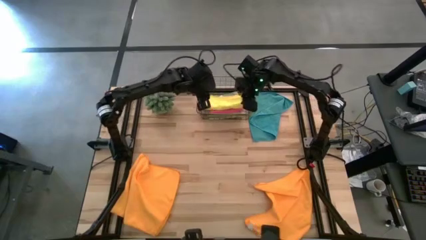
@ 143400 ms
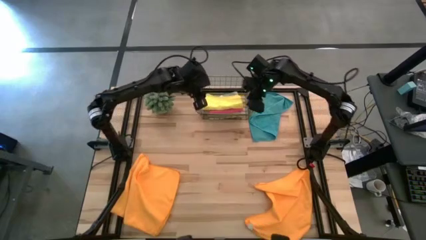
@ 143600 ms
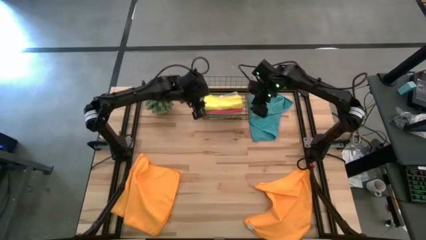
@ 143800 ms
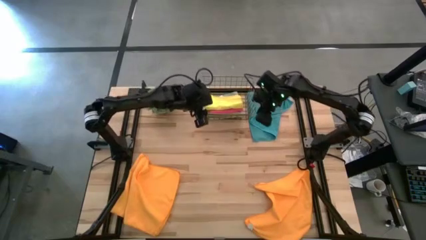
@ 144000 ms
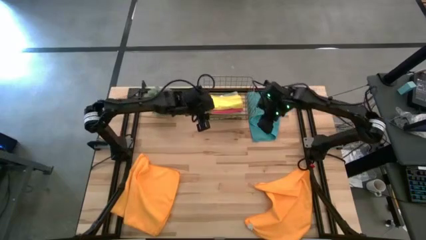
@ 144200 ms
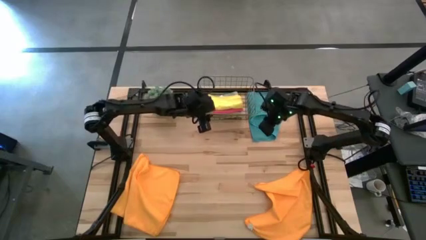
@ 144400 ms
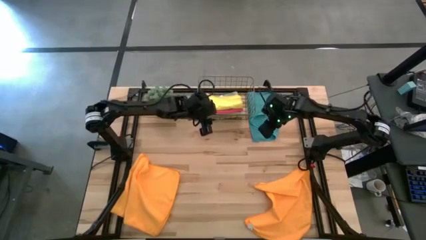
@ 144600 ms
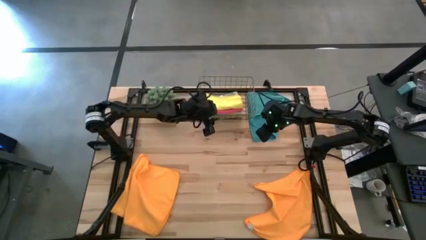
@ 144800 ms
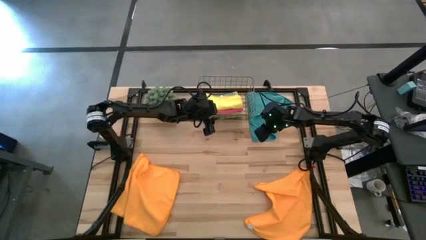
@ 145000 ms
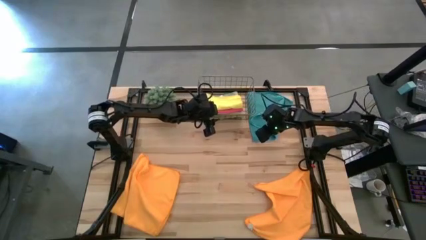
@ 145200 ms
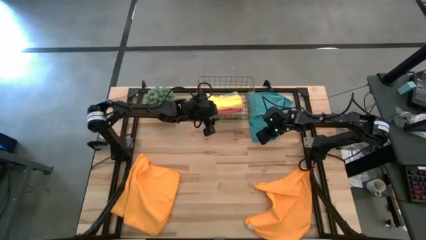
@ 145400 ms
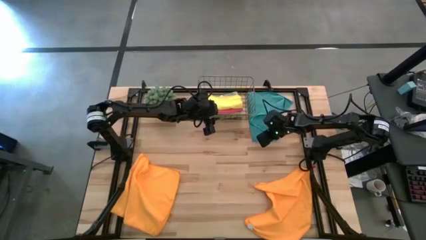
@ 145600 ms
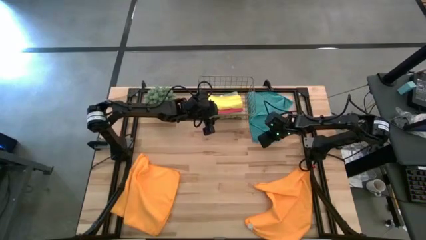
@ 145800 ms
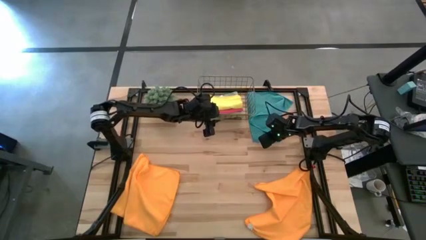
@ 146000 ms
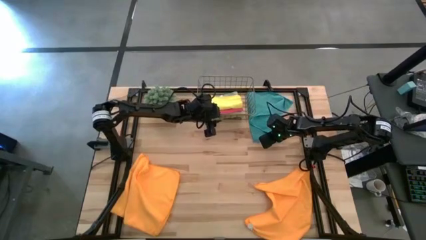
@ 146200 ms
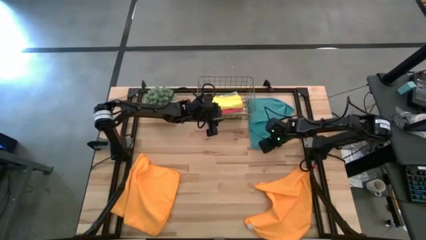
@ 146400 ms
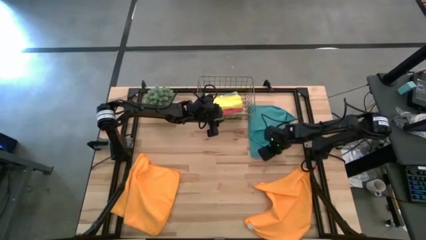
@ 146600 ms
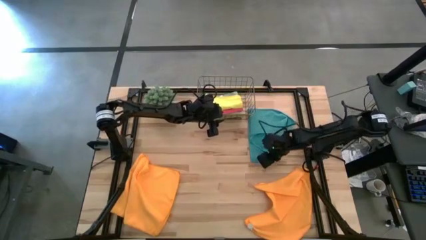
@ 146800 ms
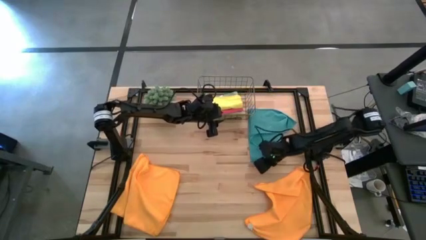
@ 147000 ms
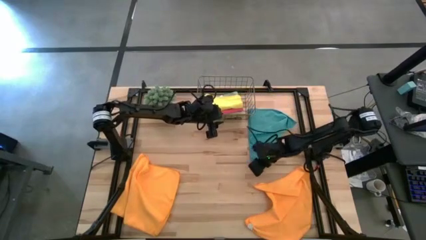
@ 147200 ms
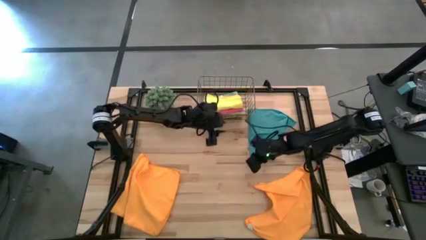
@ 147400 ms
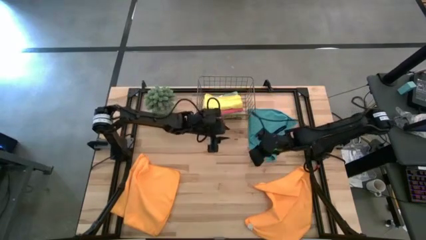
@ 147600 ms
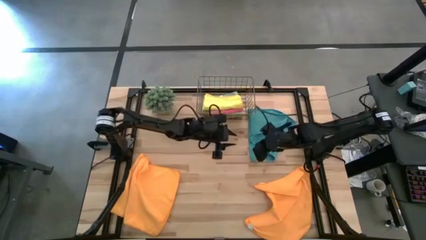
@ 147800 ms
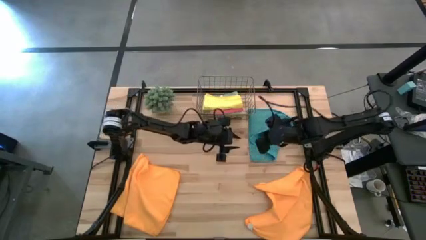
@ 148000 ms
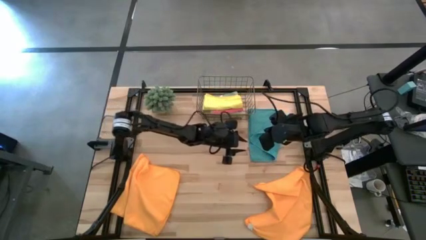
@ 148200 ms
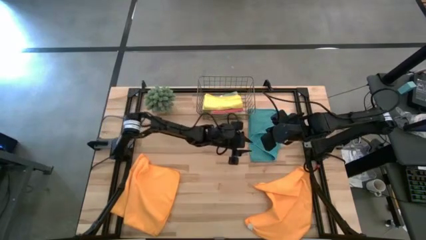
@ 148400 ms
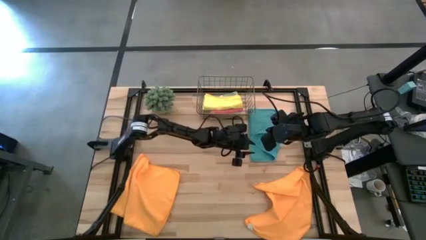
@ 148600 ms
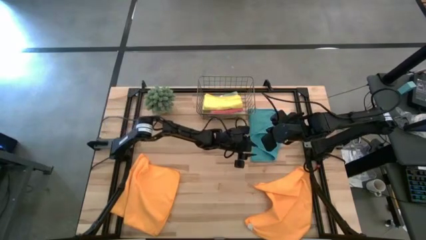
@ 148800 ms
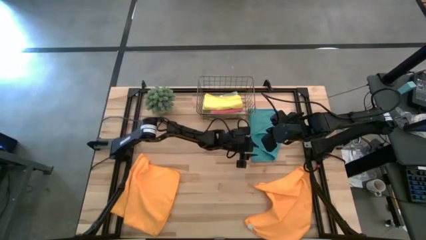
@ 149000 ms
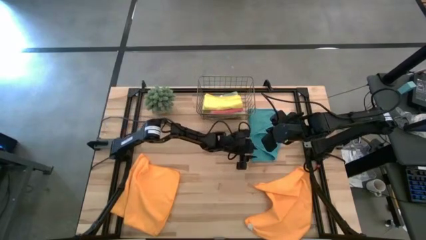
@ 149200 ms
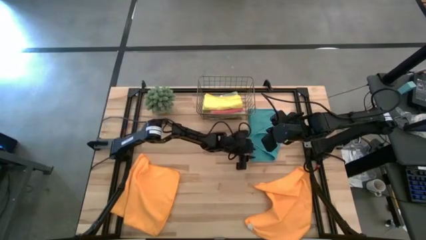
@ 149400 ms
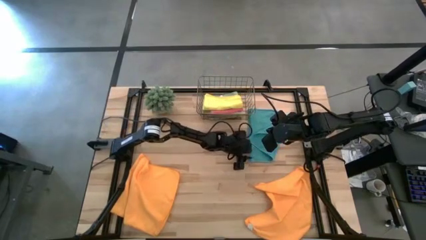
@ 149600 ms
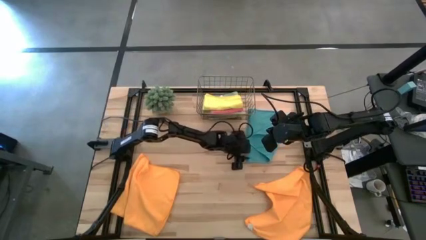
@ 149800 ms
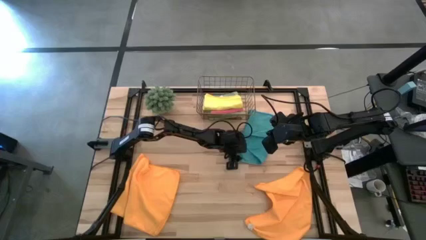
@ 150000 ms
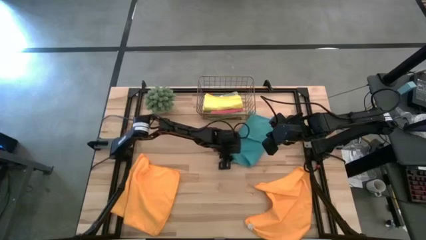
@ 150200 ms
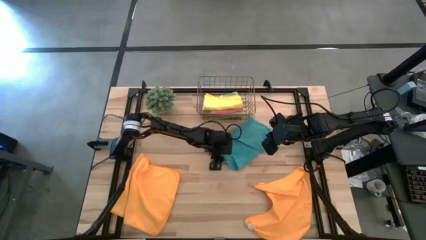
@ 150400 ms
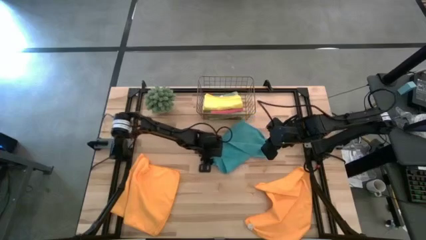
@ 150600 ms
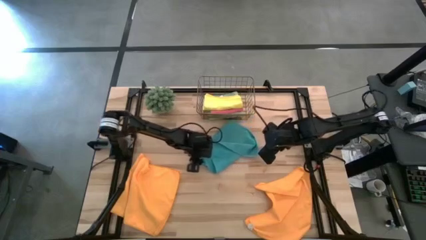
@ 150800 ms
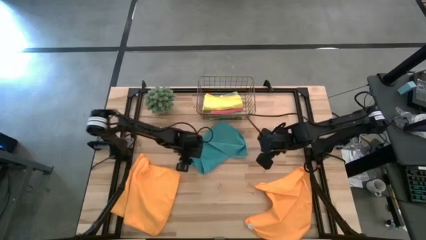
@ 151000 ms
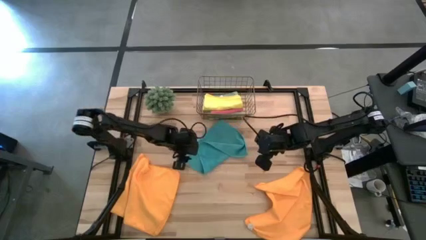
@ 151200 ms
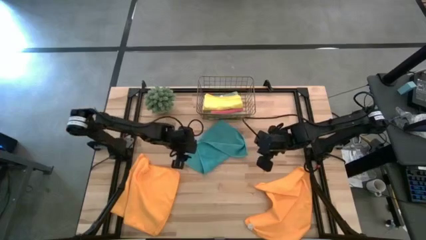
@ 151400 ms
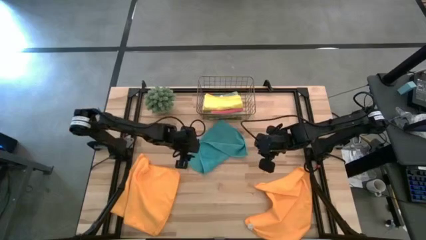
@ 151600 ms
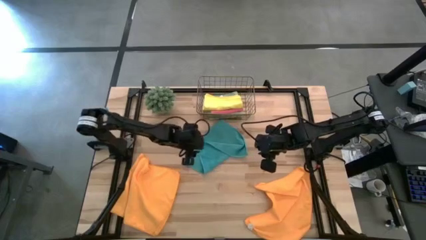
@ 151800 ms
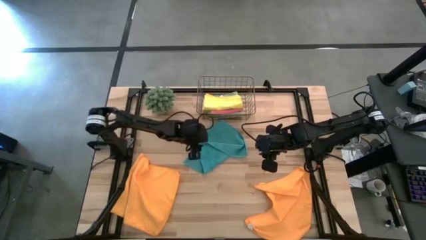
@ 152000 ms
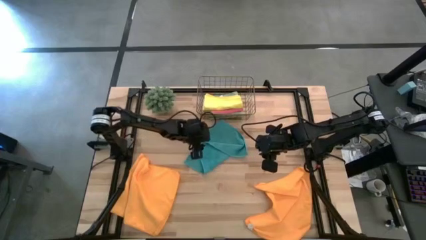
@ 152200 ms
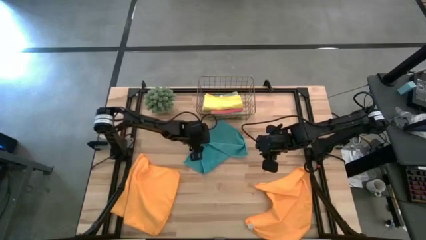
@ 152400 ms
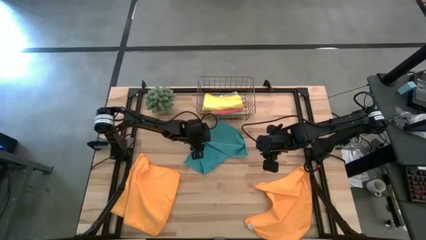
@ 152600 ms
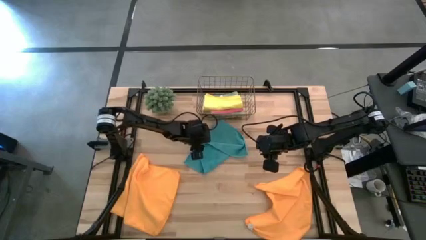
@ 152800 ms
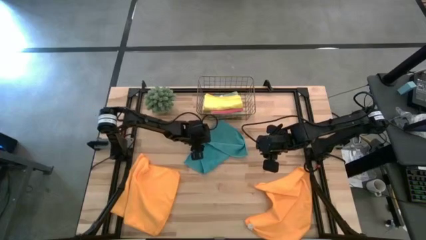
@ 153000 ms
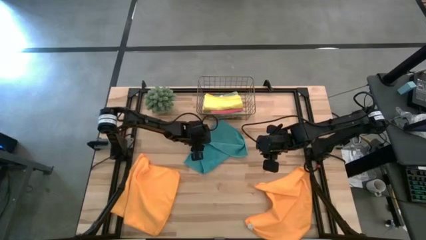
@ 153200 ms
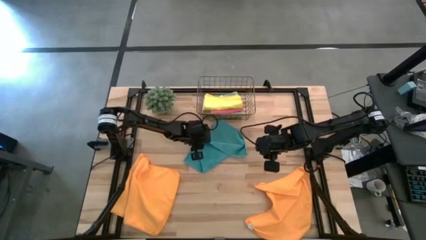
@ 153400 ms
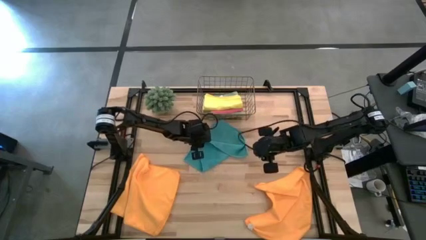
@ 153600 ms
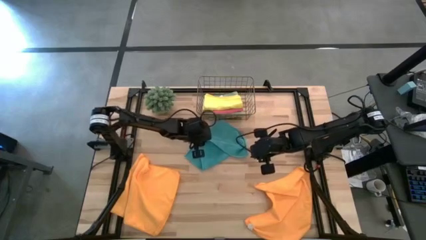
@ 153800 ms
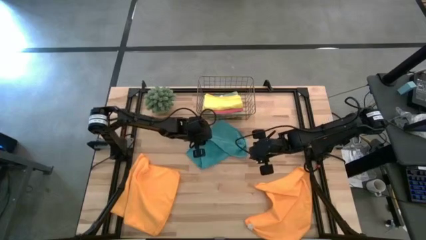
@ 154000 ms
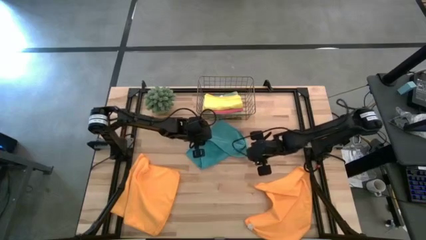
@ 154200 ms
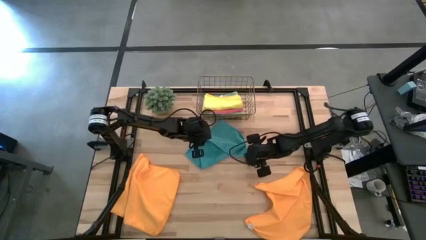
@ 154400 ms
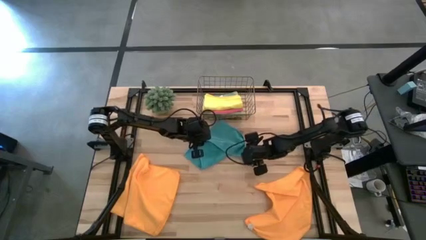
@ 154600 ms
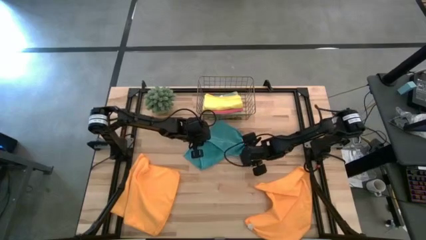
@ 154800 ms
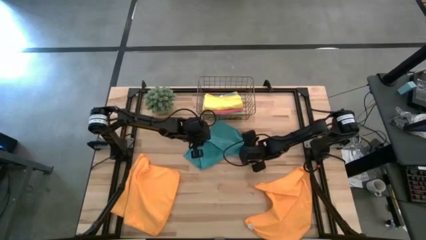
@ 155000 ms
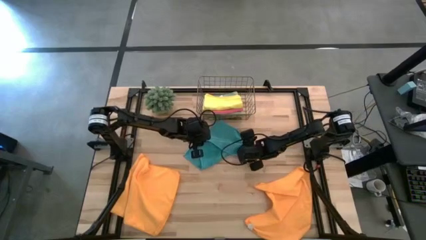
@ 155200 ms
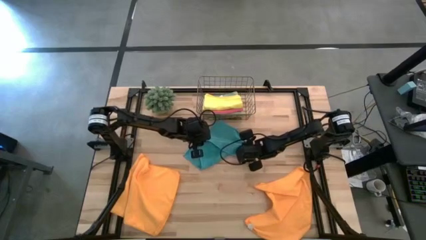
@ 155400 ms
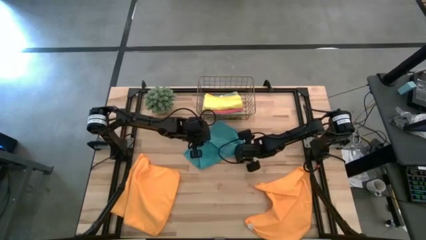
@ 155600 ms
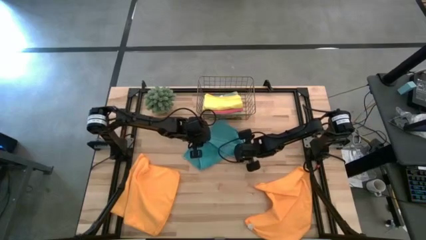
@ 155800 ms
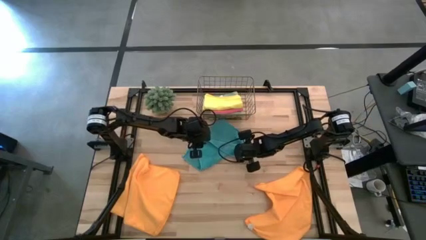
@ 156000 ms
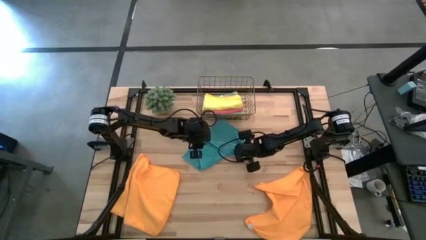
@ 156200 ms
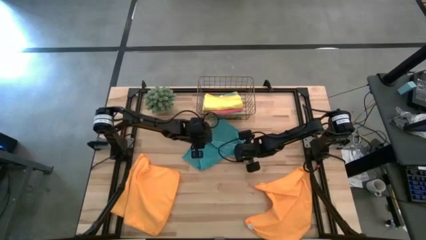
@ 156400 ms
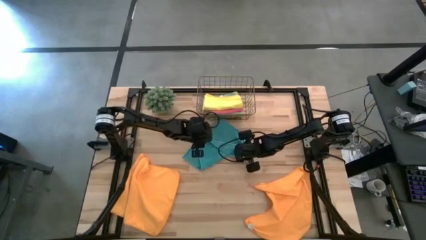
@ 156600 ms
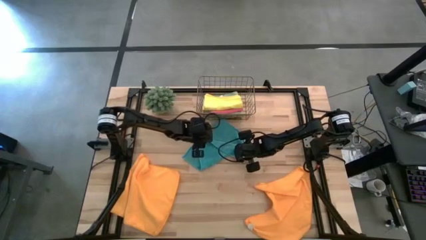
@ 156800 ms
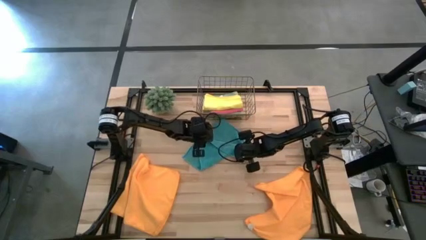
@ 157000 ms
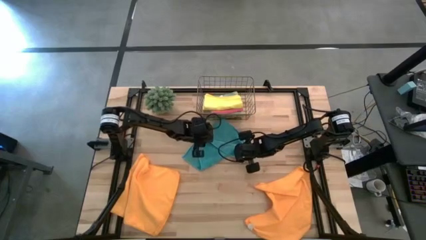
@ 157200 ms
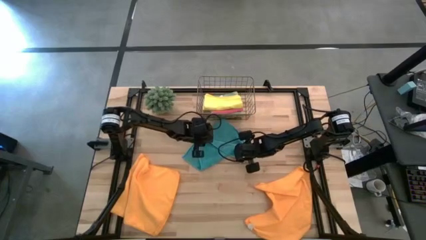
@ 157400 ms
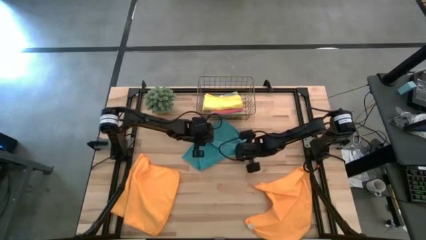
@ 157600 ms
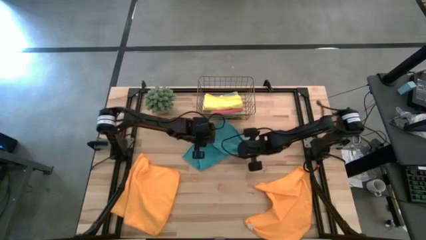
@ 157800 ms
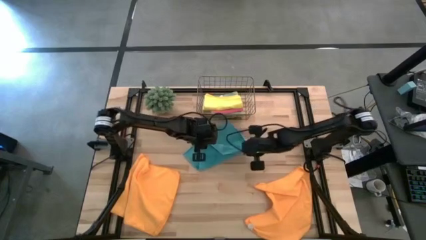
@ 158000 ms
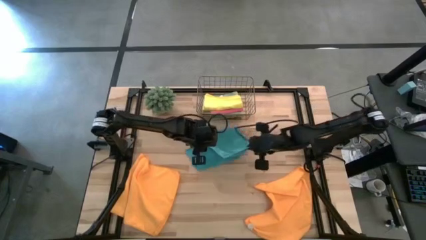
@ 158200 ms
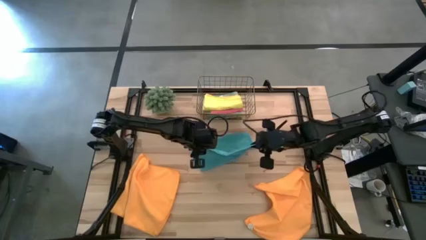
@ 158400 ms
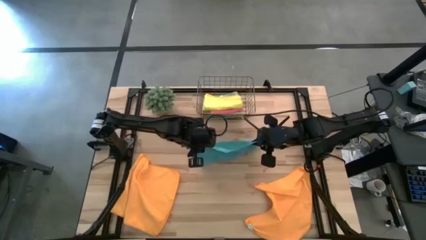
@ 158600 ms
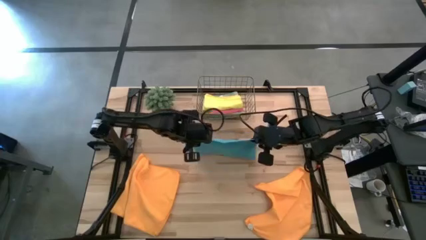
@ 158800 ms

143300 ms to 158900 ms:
Task: Fold microfiber towels
Fold the blue towel
